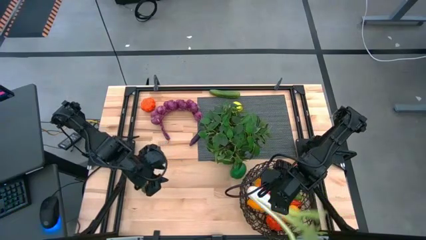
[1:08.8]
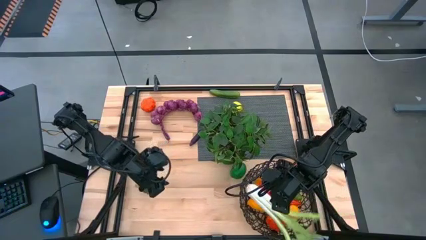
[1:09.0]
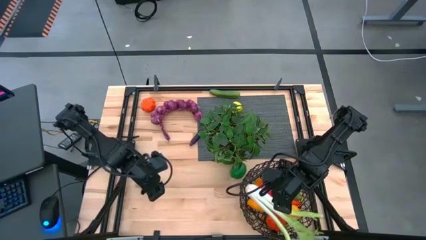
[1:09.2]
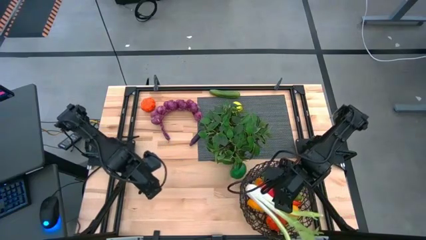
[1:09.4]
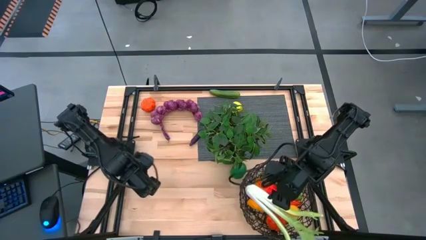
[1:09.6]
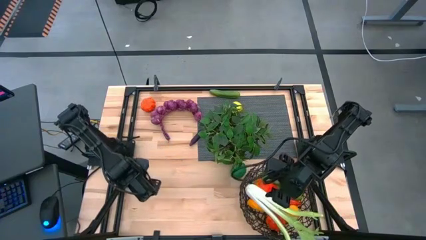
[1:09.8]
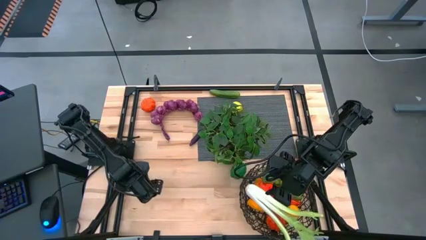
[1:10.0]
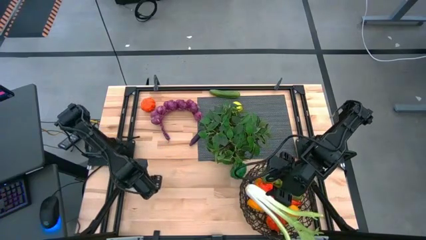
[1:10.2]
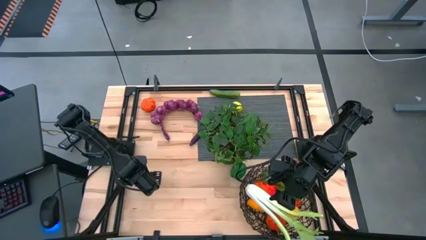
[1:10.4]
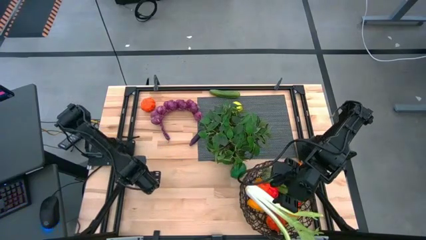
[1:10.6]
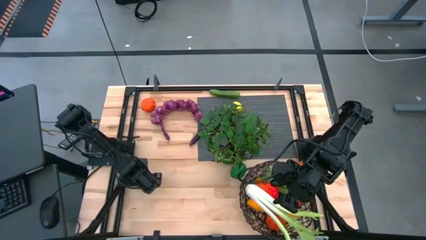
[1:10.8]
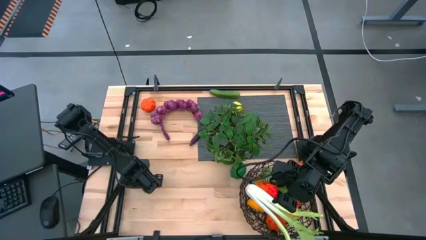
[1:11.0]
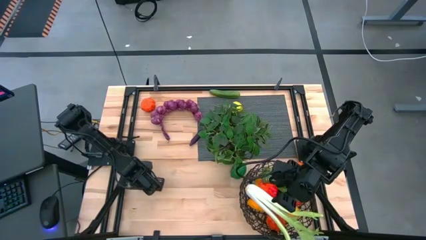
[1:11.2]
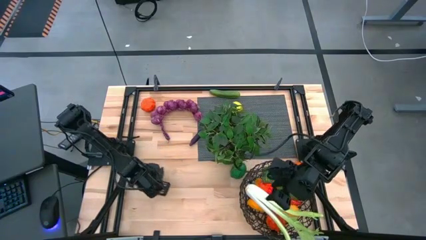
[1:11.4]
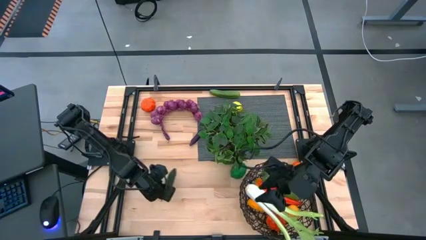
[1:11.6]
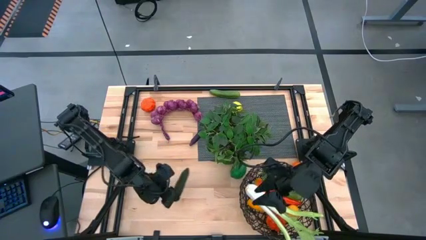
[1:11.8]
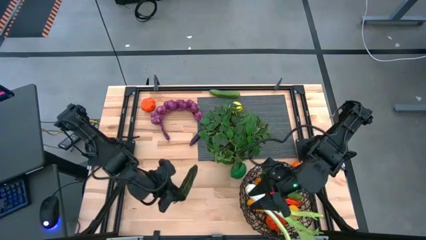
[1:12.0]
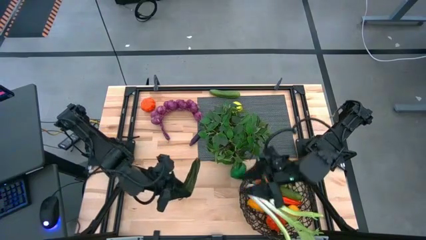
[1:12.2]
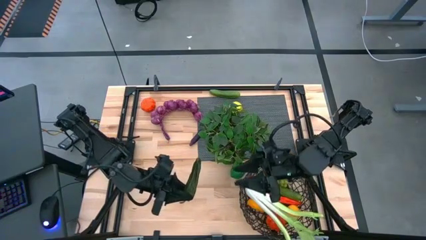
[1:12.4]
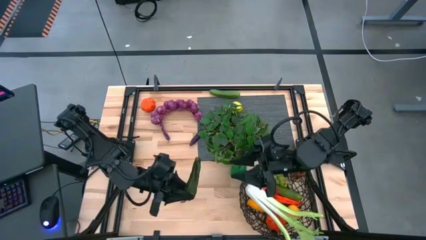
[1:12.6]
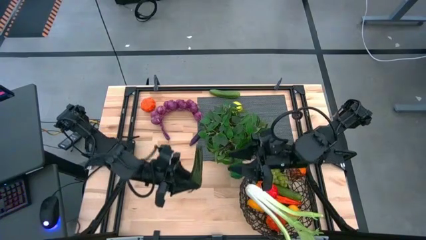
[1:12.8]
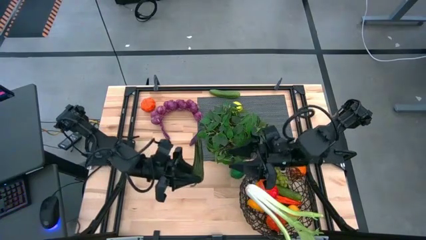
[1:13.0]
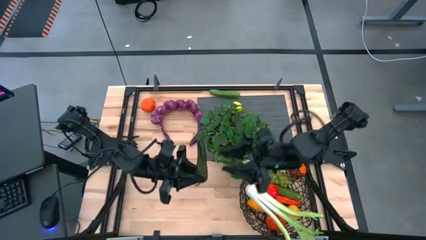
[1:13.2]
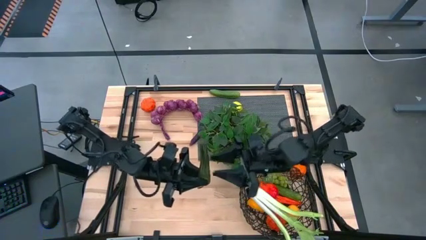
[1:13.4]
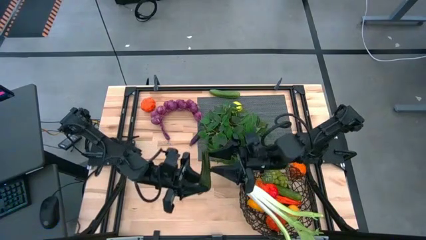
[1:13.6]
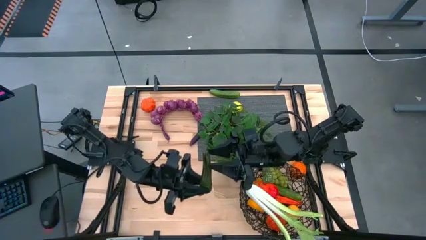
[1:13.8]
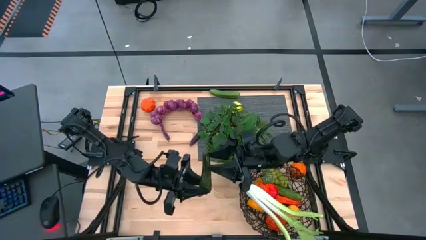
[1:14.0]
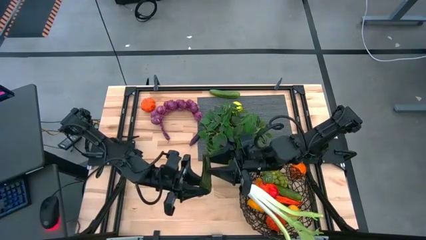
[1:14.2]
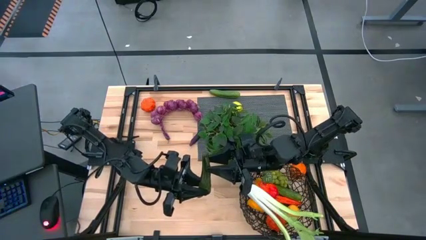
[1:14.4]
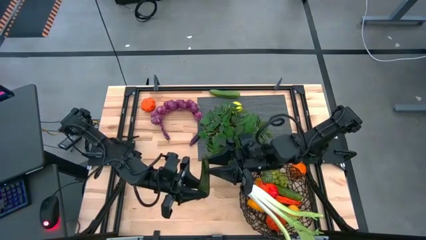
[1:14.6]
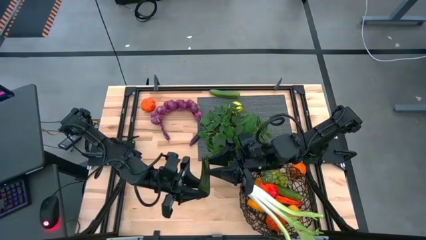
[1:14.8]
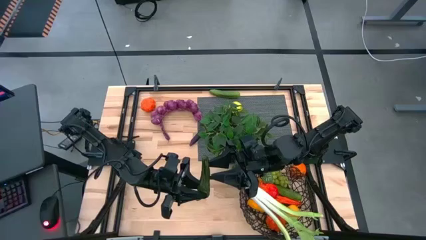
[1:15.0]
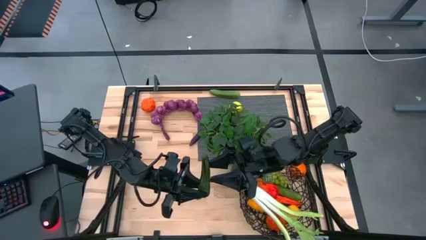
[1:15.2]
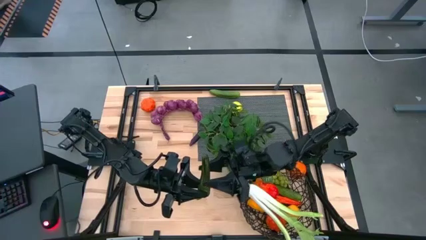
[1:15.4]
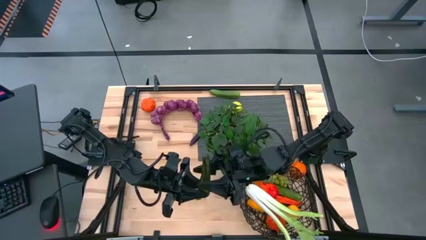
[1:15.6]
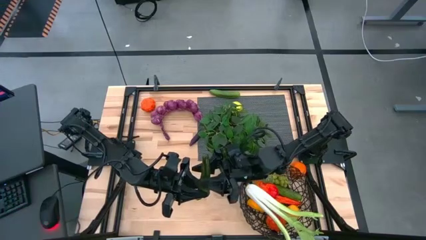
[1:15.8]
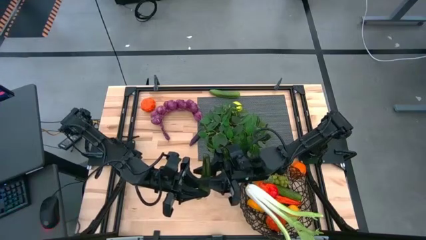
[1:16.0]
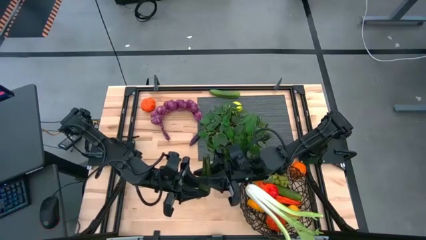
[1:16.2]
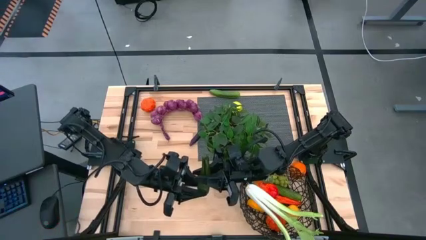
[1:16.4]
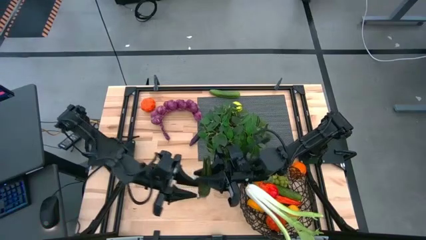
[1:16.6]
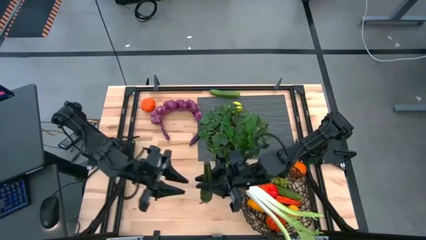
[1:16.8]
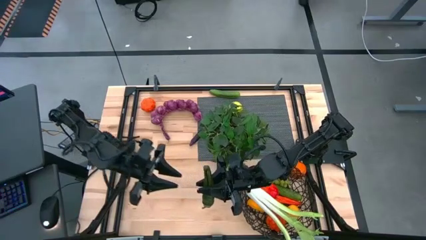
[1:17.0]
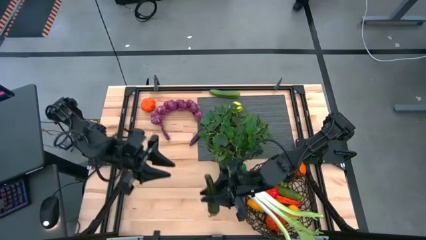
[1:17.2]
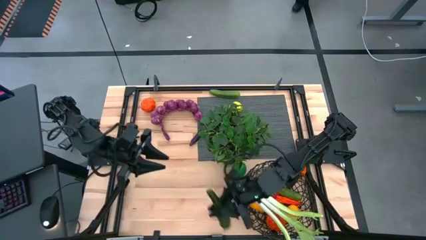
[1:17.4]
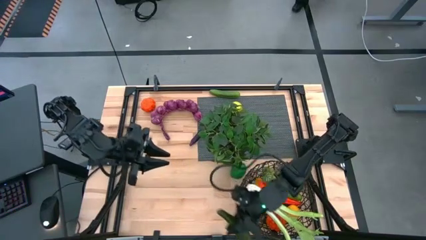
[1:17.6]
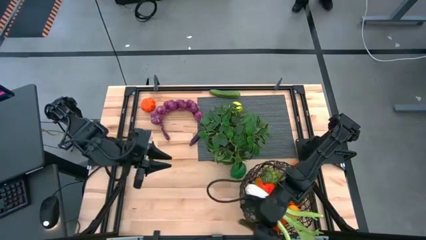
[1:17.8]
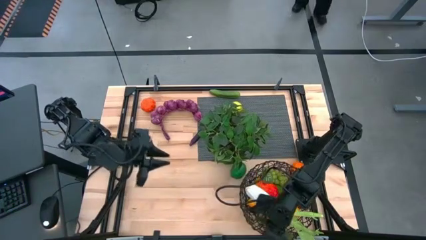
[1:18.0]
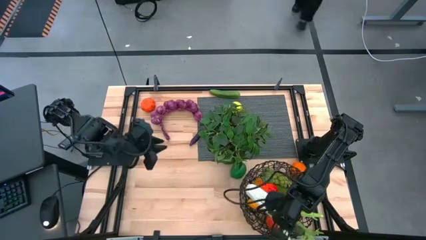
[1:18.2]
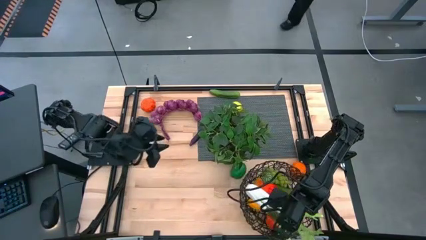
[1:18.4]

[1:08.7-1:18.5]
Task: Build produce basket
Put the green chili pepper into the brown wire basket

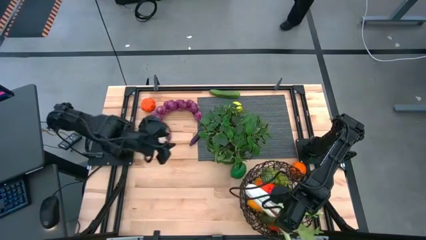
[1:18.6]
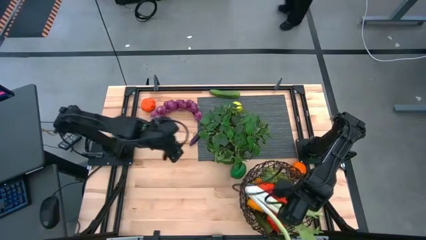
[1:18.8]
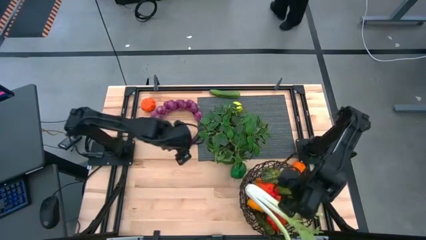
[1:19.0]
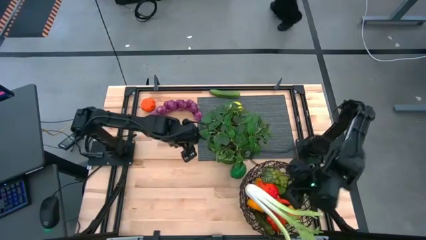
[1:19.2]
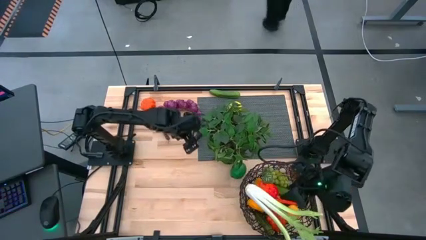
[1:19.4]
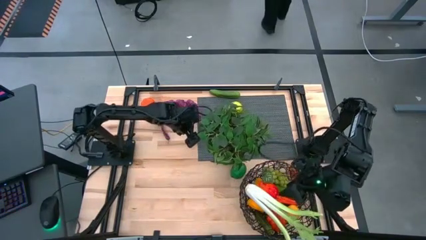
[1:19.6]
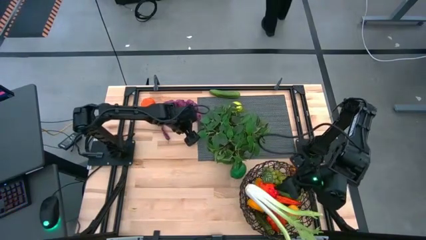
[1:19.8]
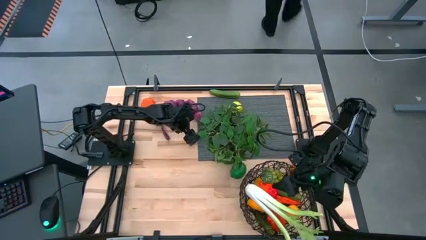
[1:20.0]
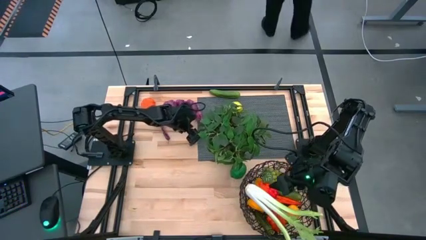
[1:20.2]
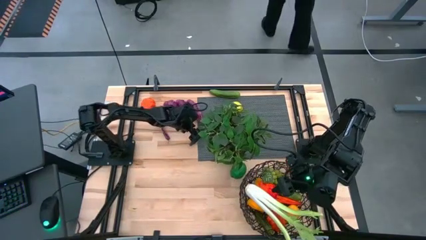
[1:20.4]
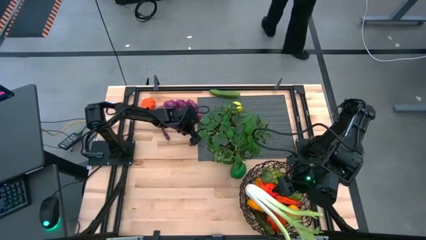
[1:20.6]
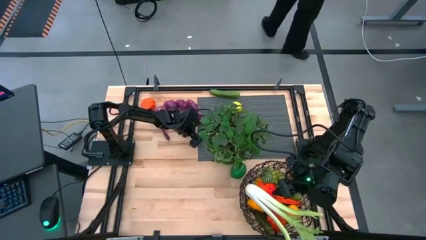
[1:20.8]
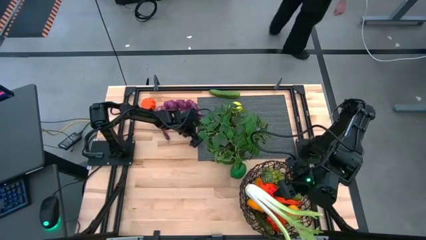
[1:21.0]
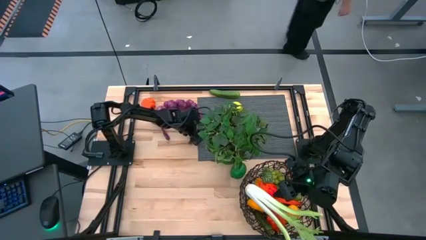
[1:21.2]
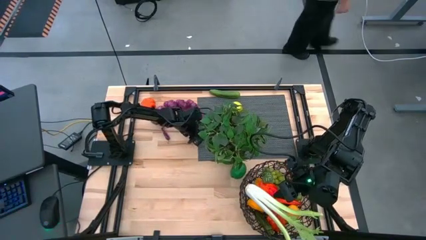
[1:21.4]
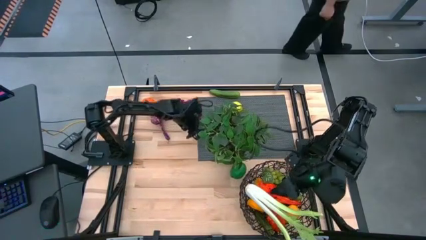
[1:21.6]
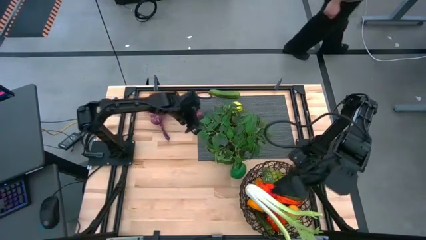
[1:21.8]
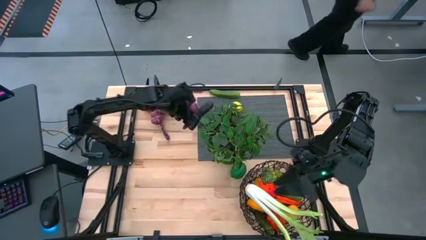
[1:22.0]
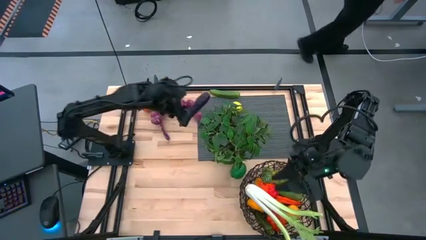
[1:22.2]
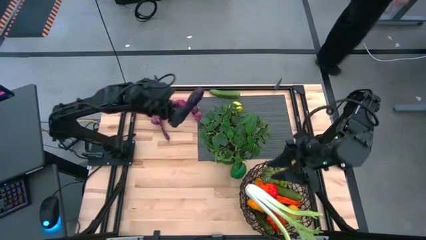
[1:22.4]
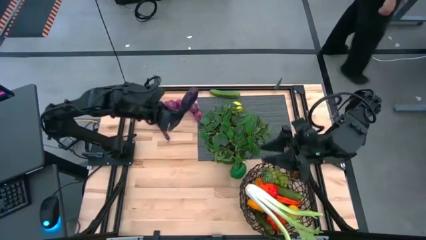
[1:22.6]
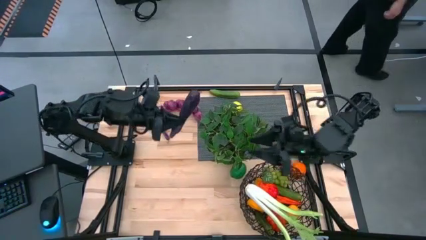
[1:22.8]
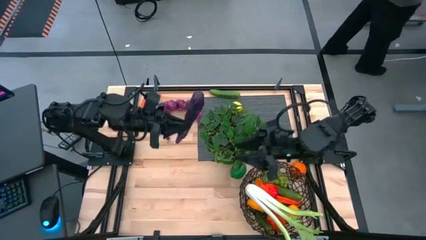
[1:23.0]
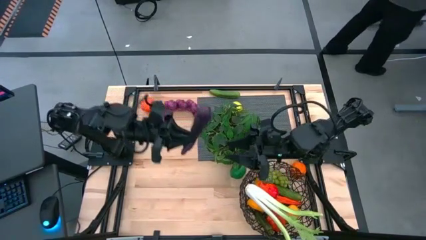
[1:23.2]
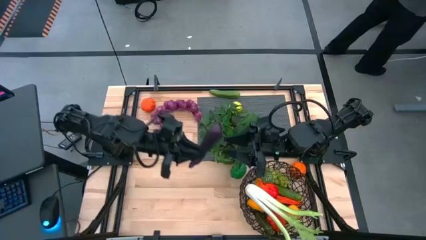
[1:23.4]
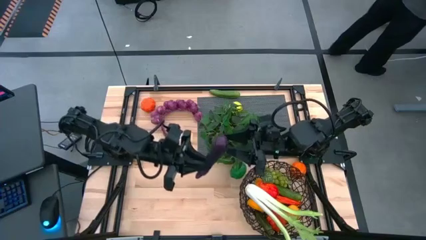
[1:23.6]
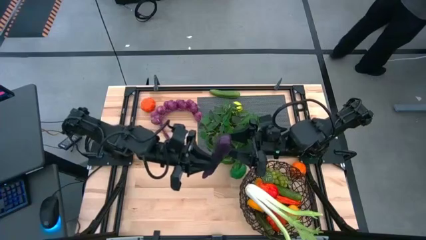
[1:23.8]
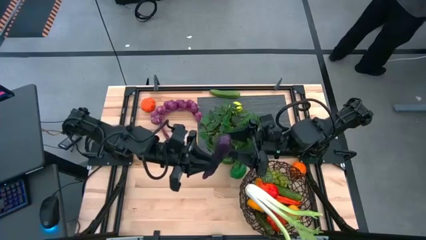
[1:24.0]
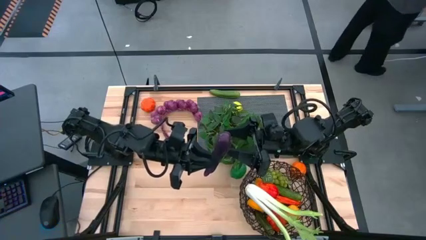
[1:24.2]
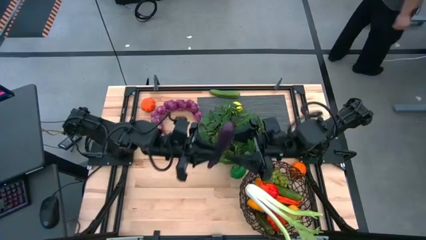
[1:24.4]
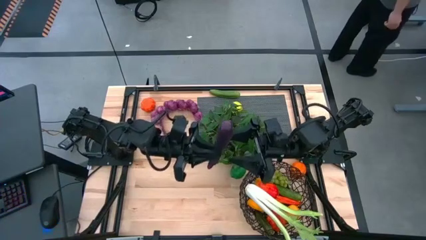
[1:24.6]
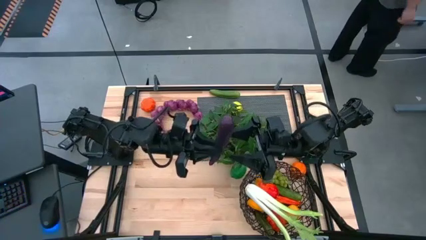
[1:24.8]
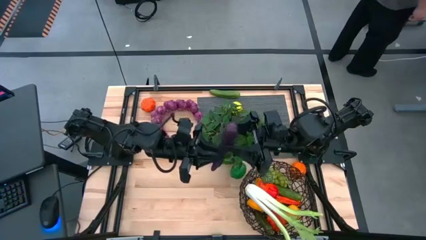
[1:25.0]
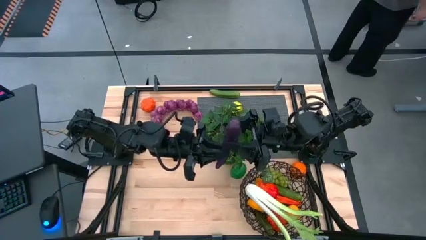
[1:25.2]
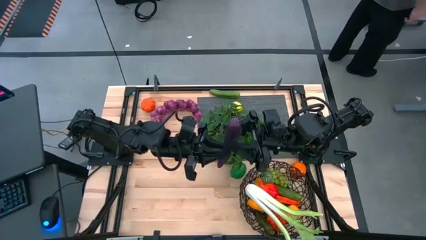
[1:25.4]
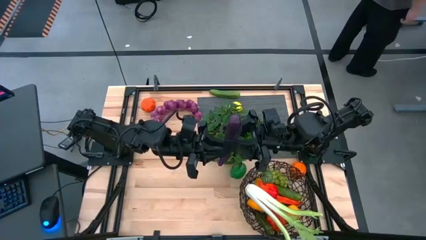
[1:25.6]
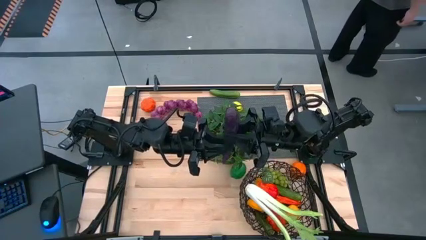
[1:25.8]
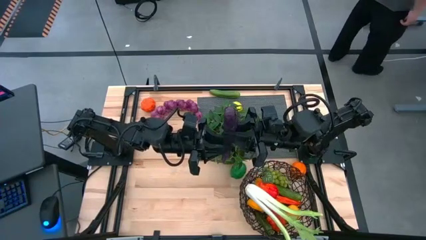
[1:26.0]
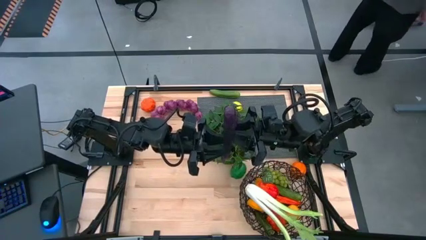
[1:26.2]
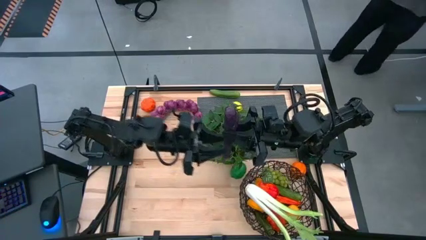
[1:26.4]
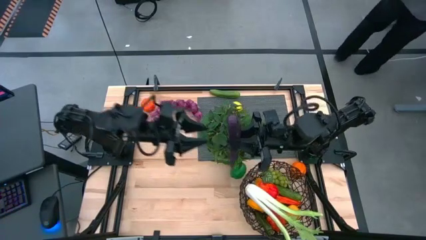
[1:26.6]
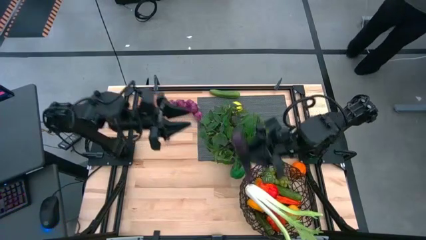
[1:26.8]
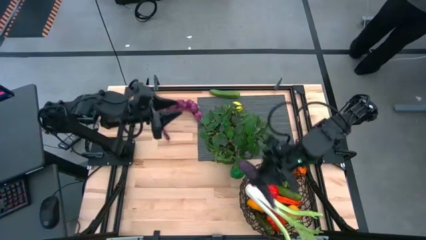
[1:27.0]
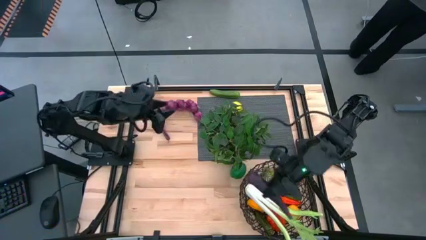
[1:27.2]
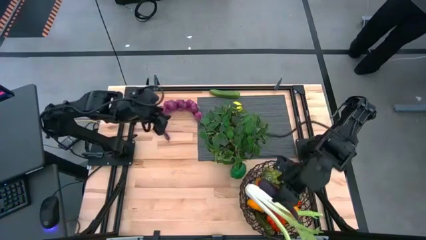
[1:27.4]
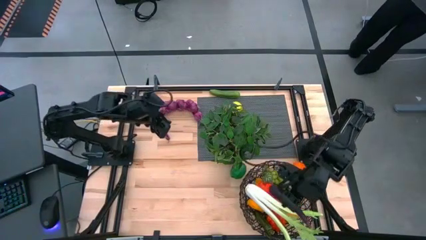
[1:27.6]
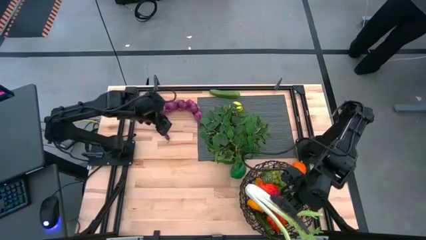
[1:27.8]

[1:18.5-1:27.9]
Put the left purple eggplant into the brown wire basket
